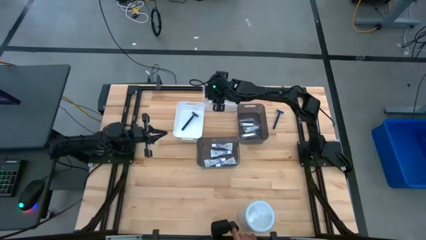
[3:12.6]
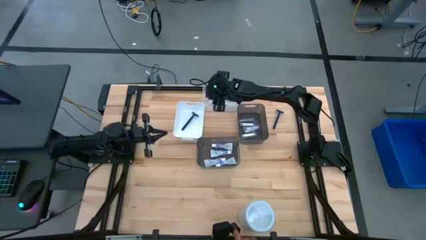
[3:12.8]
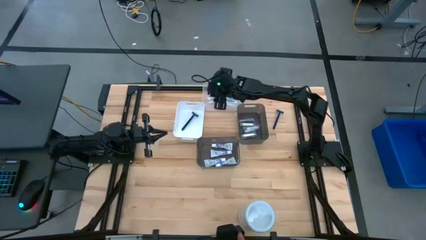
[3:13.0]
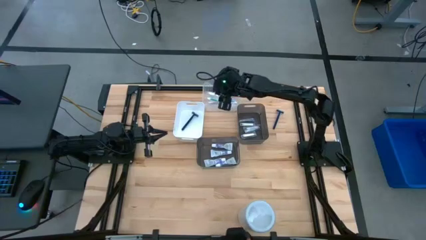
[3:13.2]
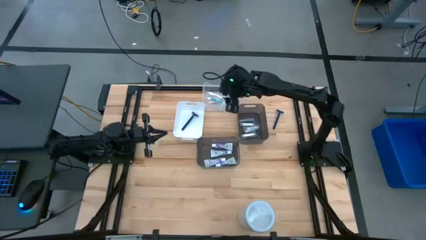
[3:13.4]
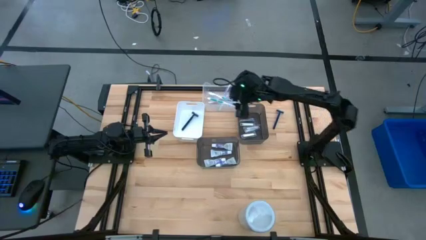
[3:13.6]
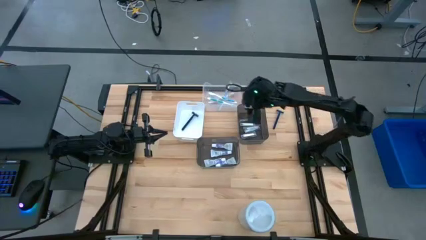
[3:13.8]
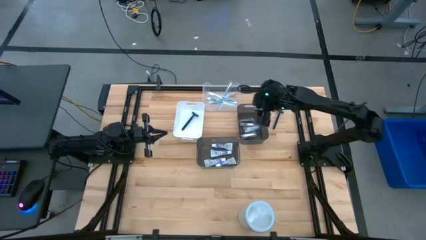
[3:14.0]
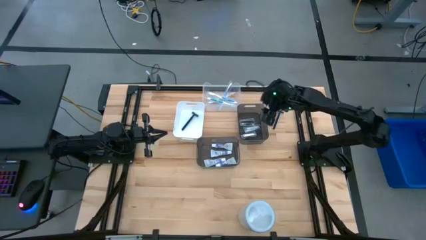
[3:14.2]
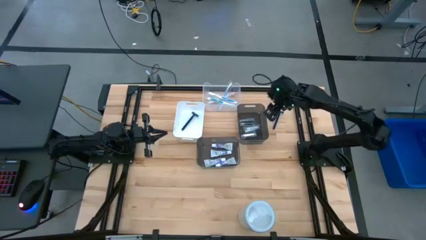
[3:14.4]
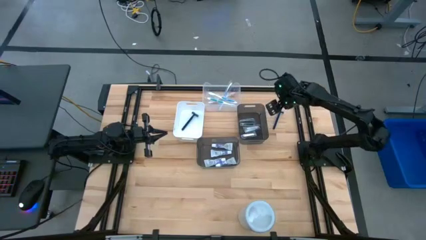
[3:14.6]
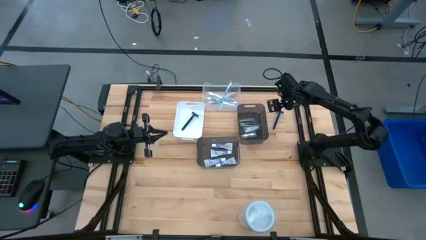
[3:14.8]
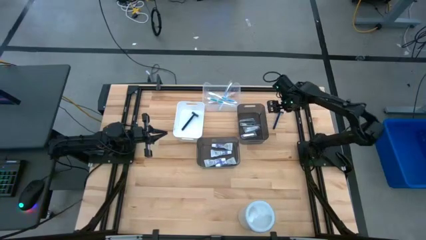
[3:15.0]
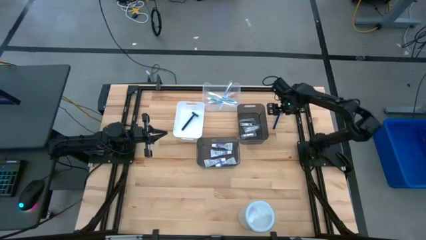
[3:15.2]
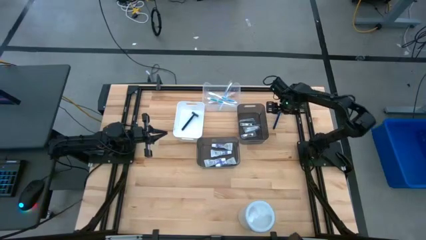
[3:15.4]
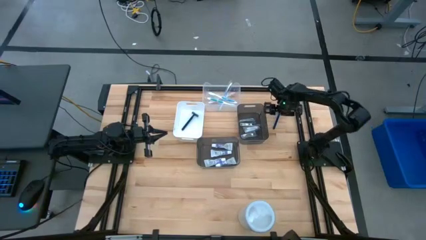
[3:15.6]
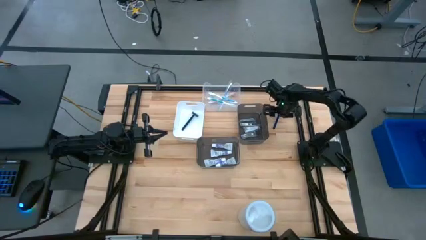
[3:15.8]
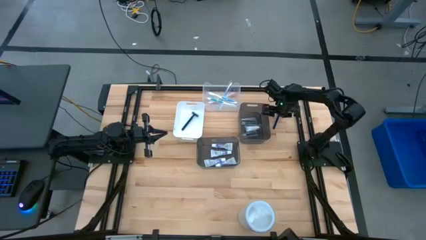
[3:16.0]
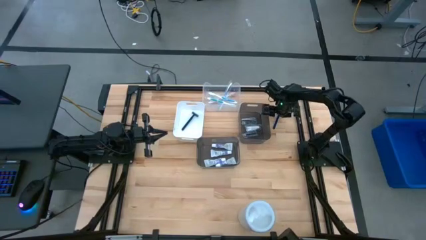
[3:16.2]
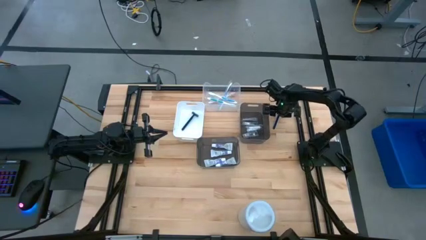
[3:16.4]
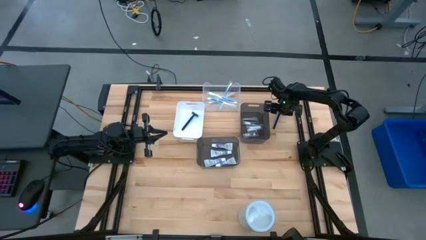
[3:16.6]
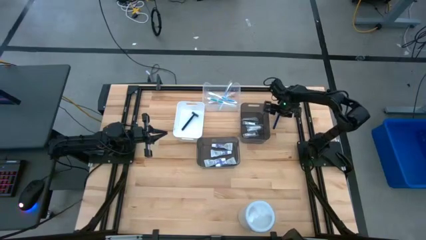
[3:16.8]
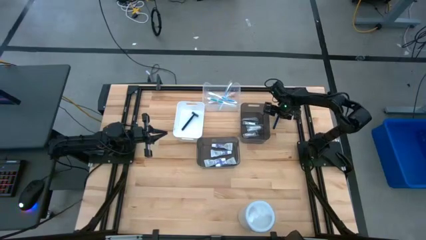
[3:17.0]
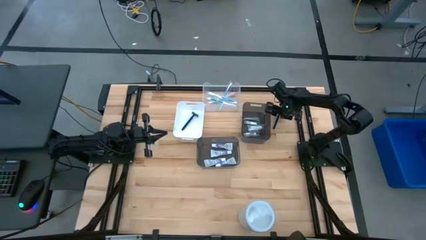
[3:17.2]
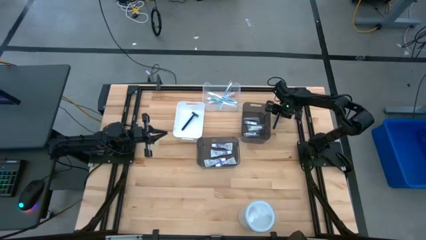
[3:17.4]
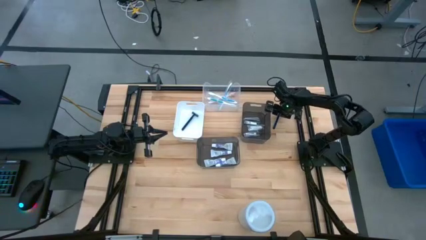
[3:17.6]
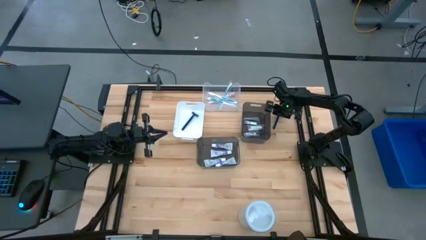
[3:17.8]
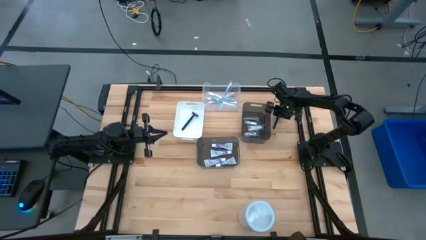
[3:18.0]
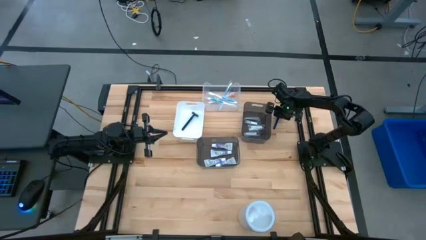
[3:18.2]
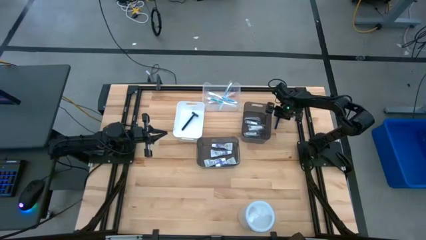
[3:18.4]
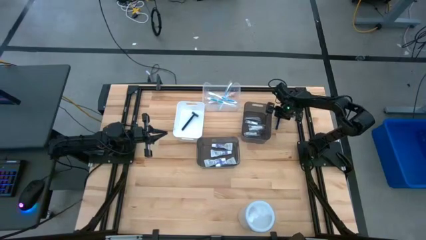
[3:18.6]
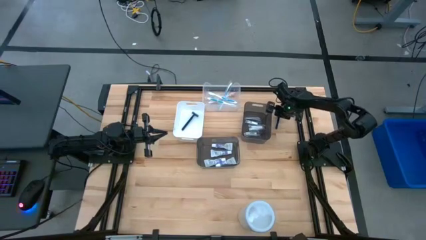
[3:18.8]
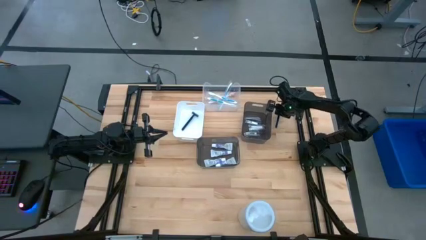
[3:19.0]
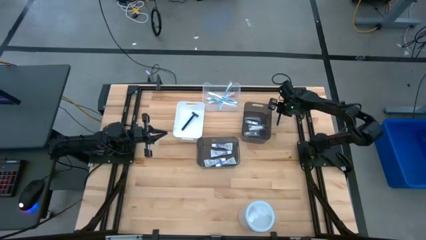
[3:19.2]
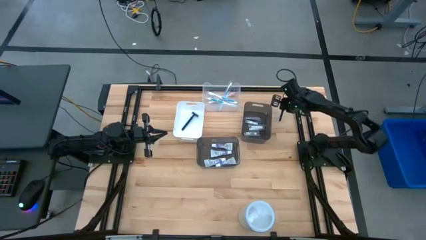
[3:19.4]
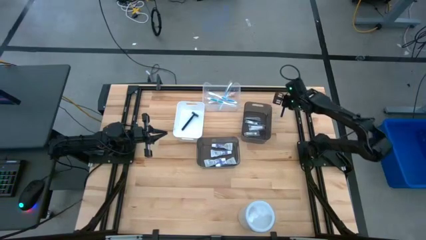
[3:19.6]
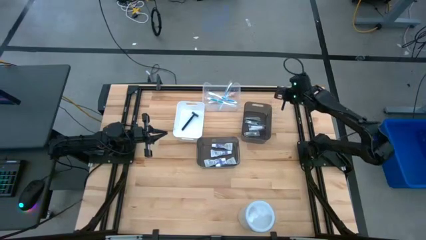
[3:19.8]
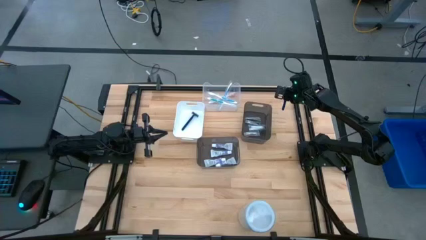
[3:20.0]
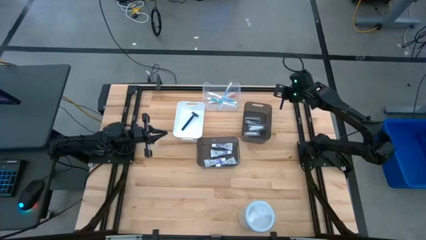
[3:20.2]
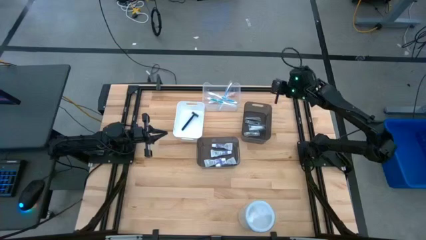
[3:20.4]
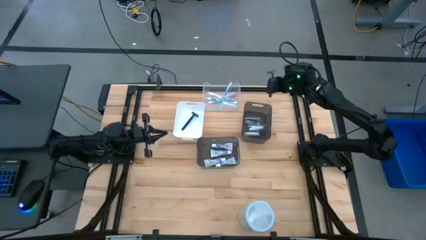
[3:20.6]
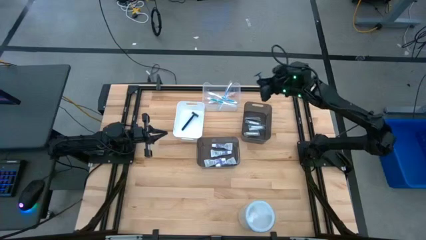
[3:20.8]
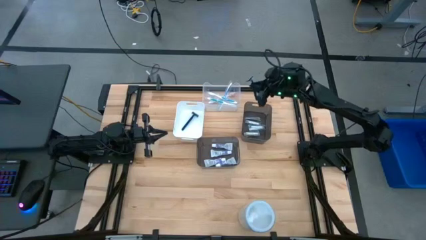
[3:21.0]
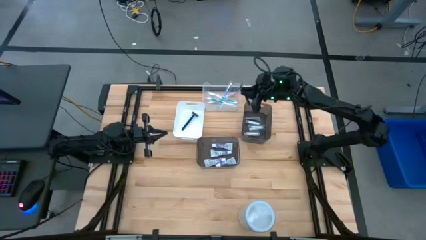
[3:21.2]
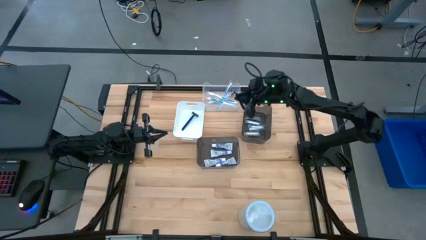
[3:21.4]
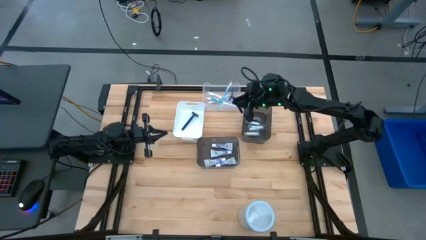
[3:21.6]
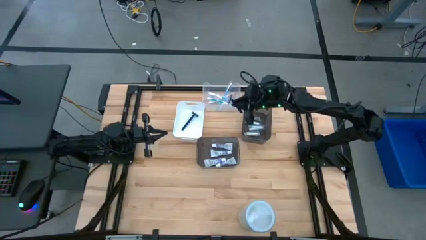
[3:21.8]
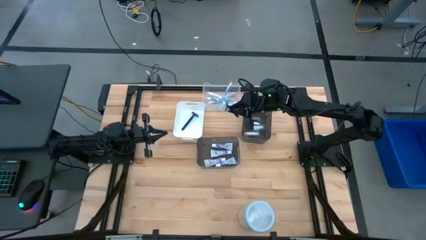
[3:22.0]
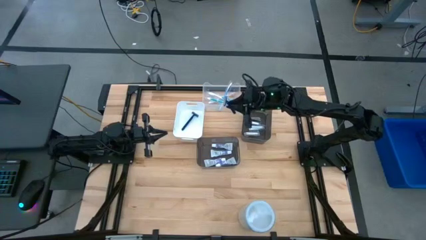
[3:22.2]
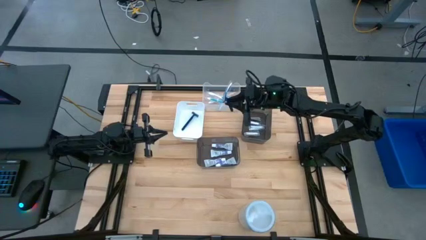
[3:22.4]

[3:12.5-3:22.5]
Task: Pick & Place Travel size toiletries
Put the blue razor into the white bin
